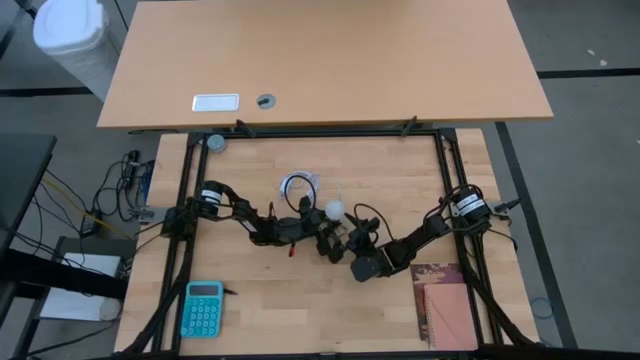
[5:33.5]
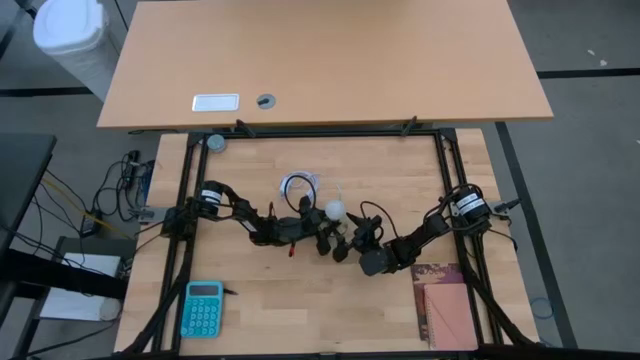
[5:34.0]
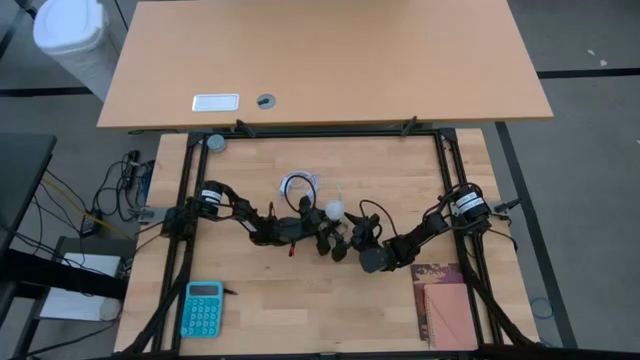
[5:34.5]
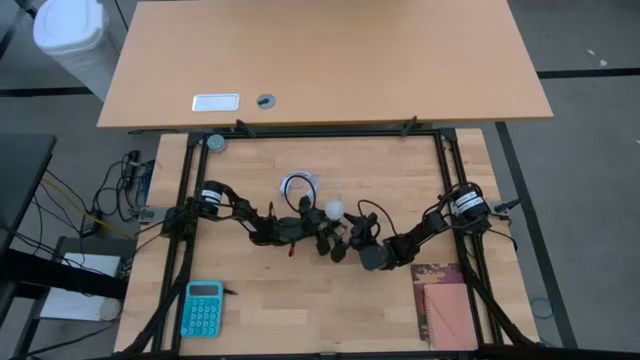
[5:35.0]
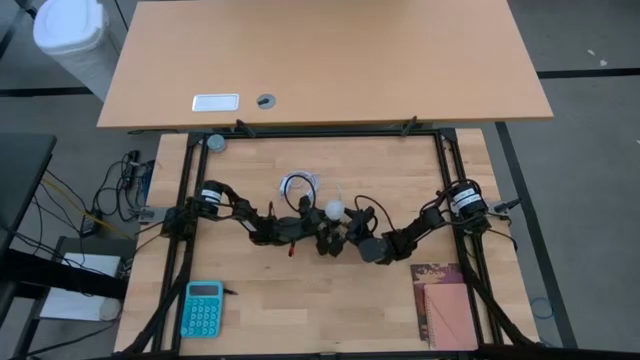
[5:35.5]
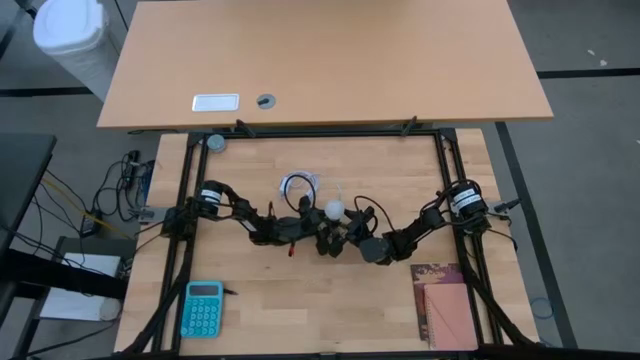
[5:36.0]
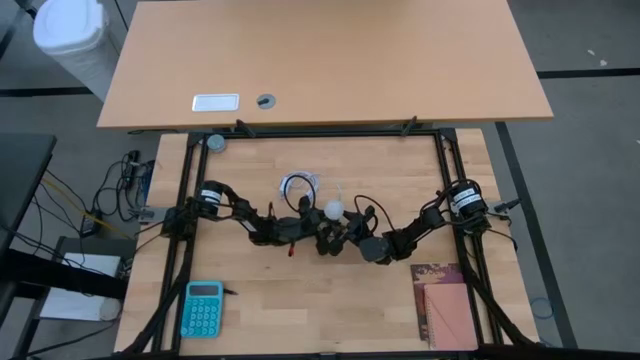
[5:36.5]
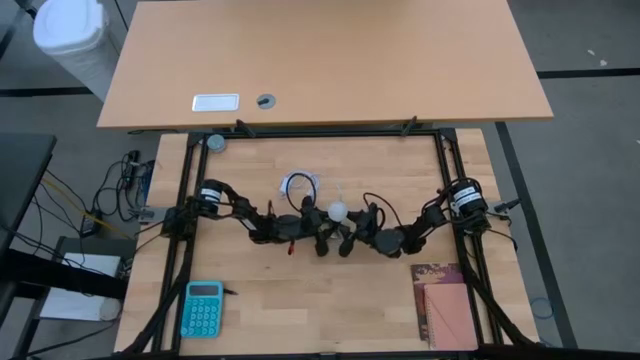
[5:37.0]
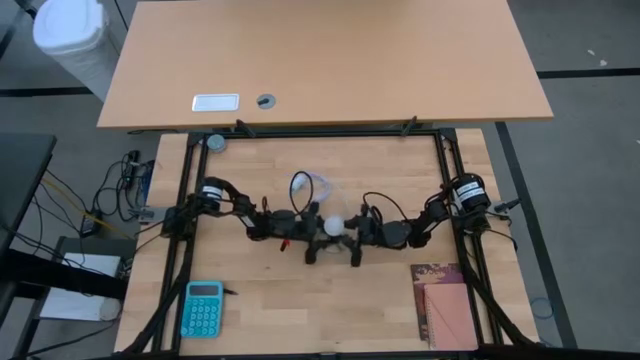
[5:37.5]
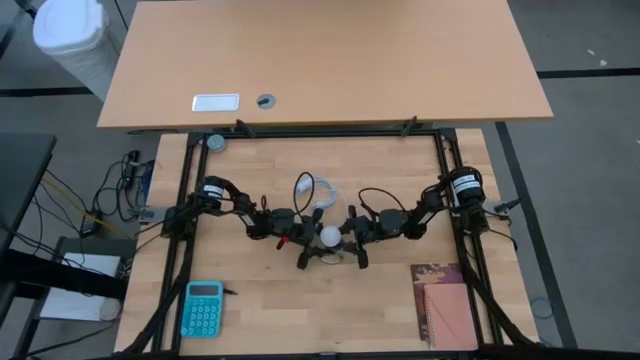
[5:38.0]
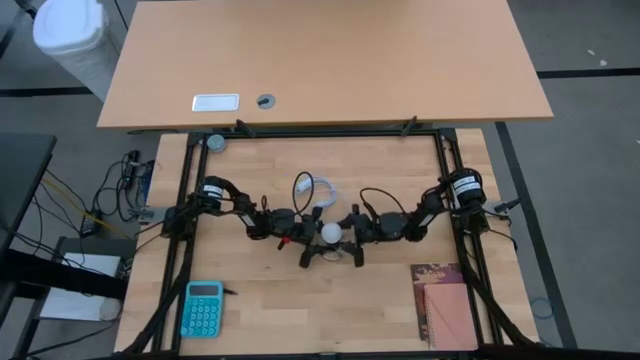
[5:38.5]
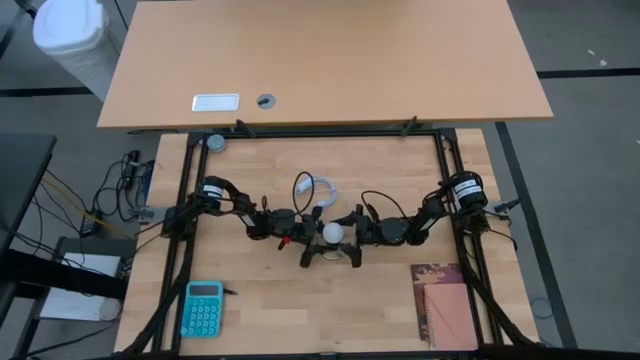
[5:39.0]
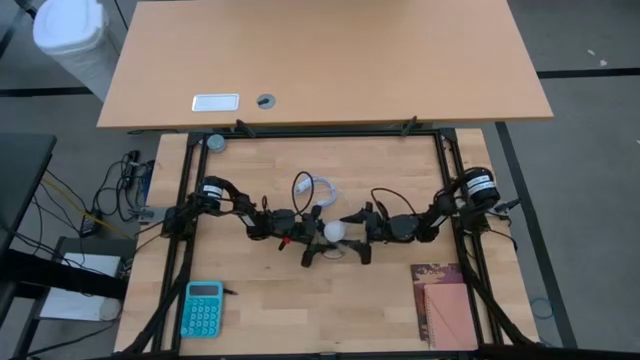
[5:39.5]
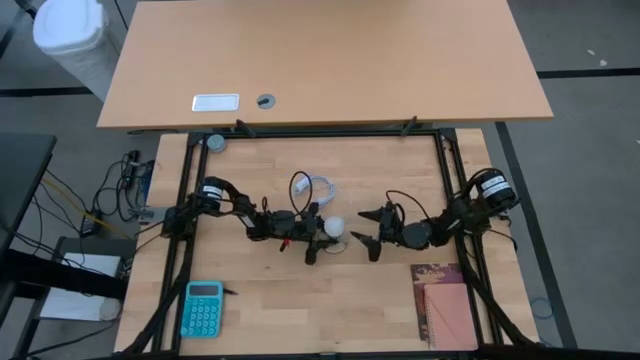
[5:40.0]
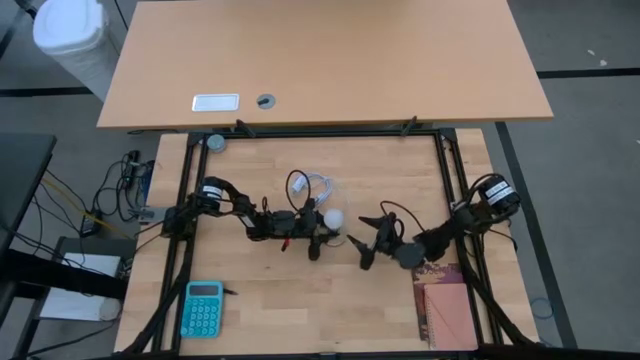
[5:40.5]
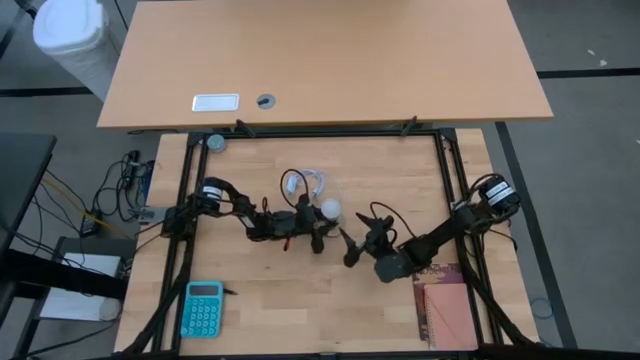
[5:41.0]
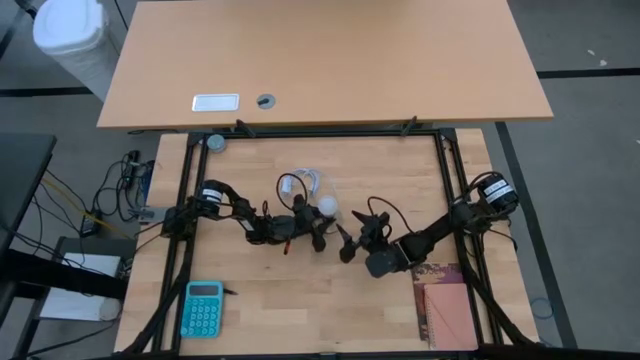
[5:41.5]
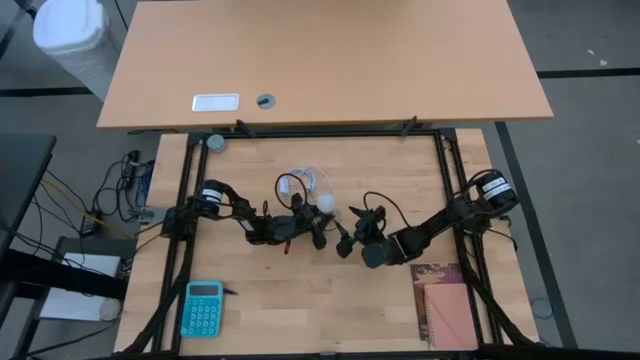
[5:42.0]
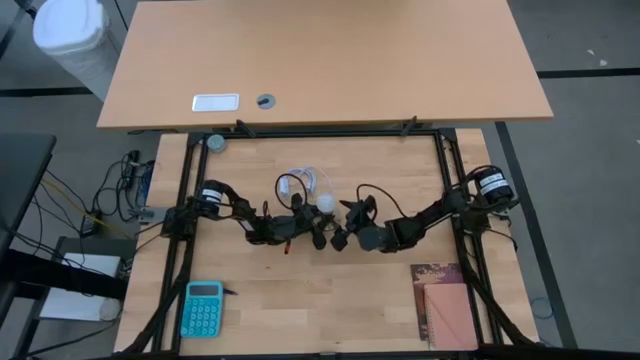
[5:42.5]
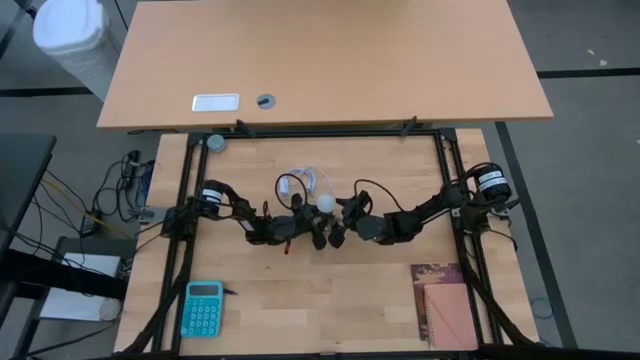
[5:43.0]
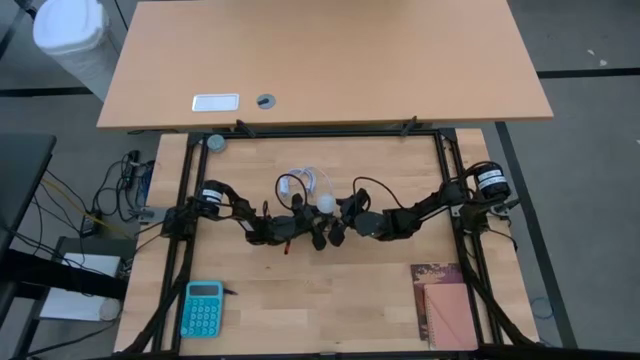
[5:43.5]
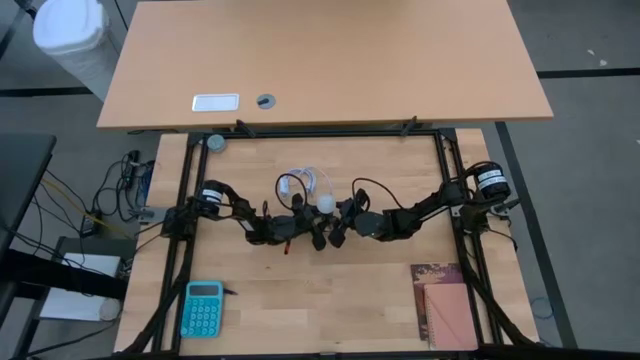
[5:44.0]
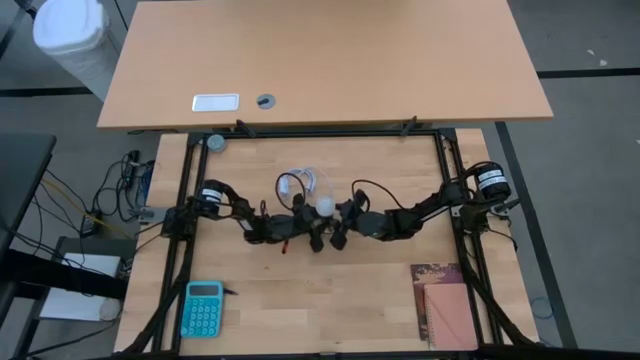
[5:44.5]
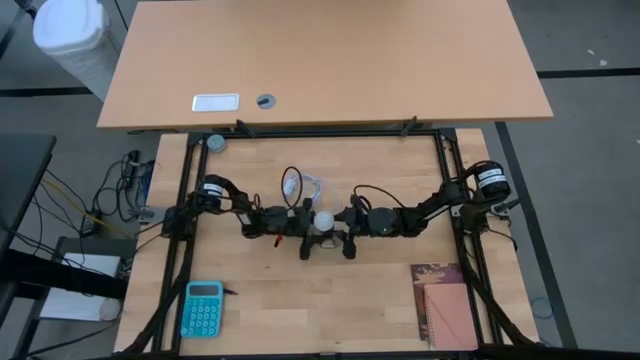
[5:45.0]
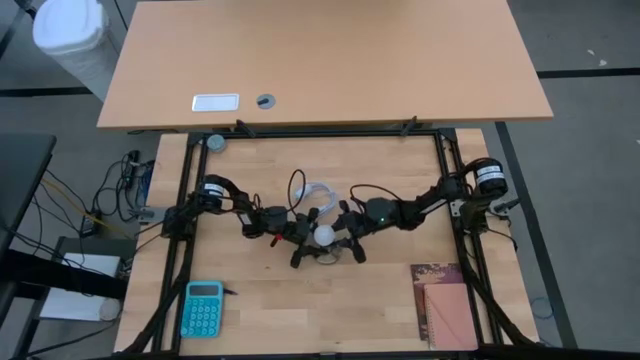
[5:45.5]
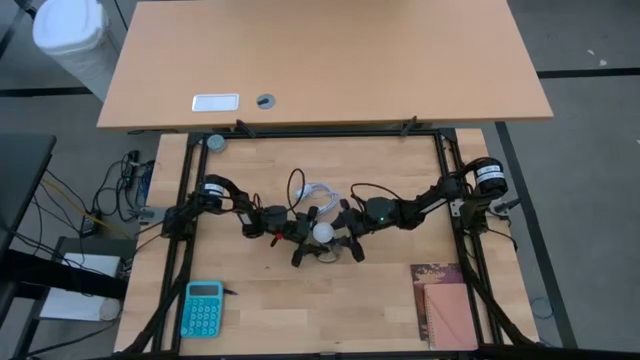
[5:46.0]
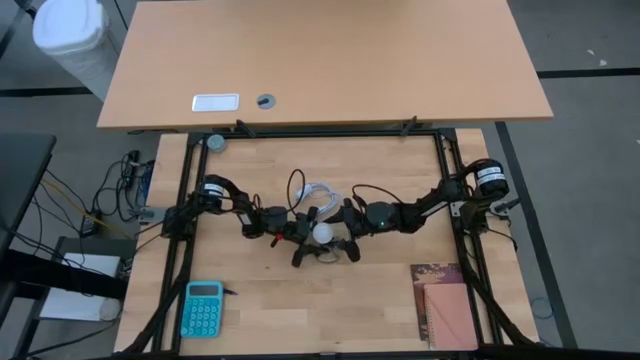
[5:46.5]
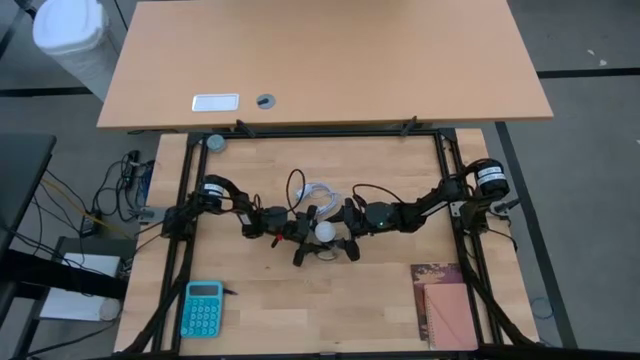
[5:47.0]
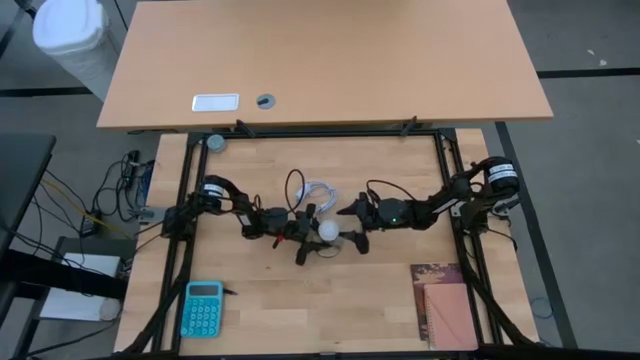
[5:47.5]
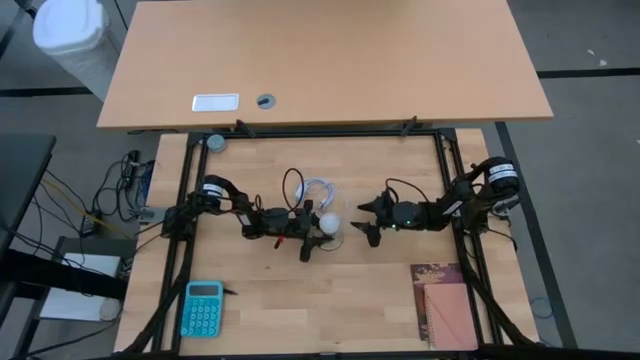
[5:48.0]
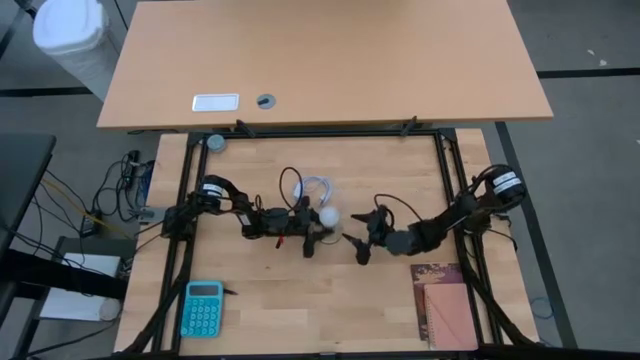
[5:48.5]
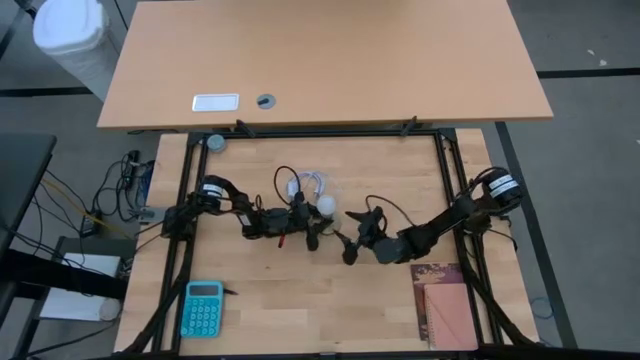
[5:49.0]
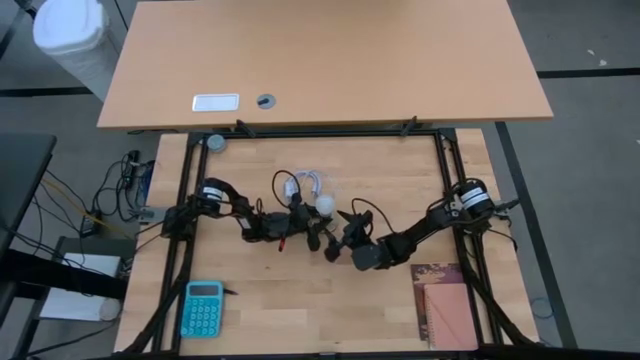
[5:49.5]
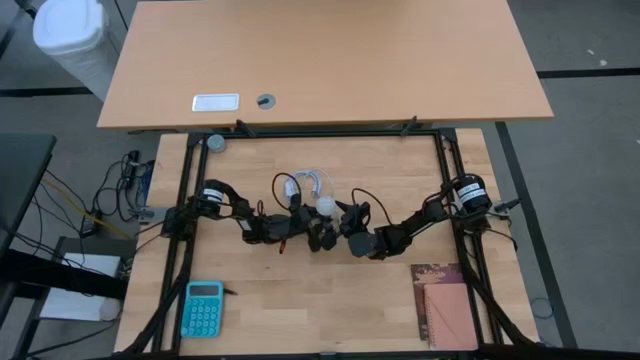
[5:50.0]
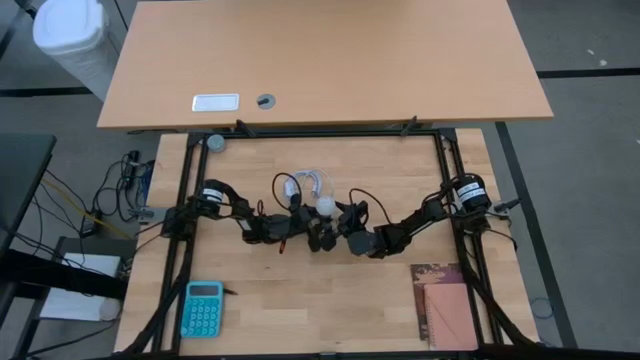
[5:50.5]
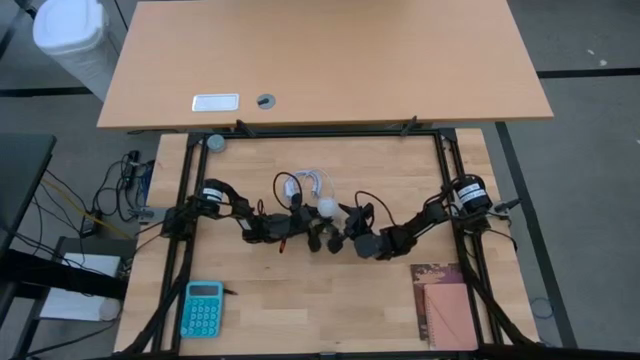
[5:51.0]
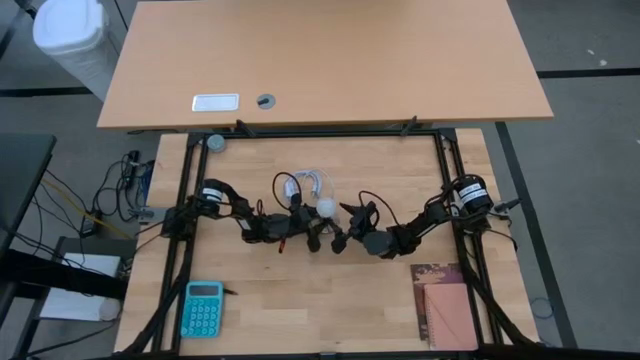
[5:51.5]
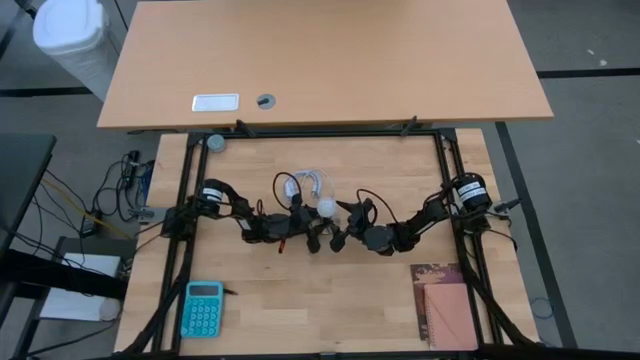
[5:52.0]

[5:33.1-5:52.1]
Task: Screw lightbulb
Remove the white lightbulb from the lamp socket
